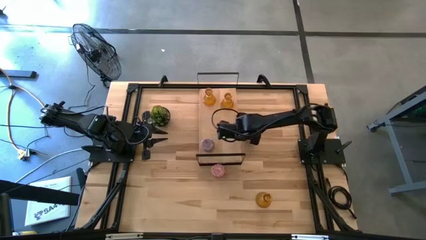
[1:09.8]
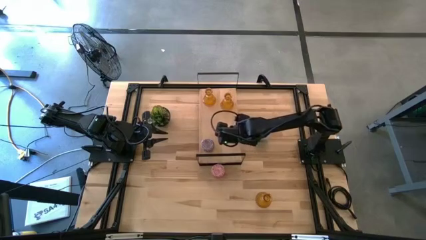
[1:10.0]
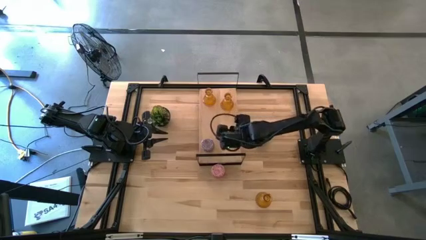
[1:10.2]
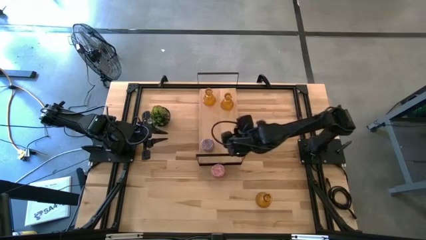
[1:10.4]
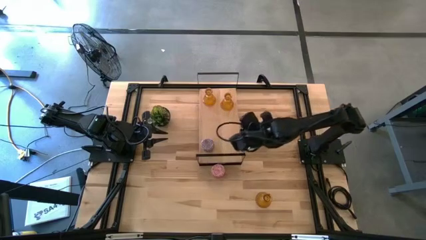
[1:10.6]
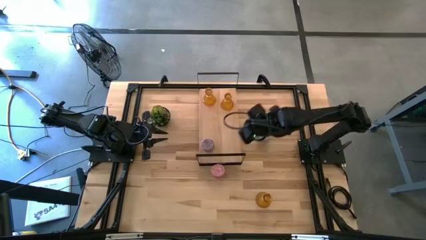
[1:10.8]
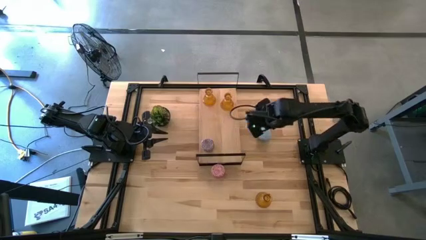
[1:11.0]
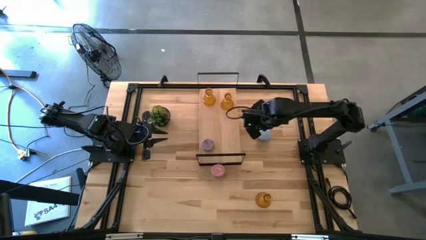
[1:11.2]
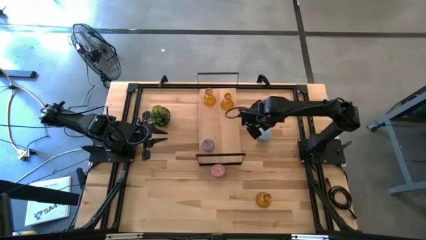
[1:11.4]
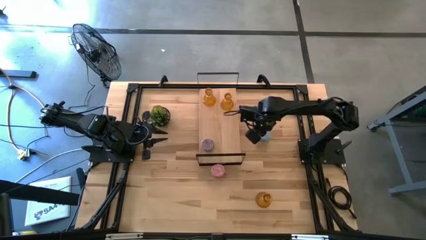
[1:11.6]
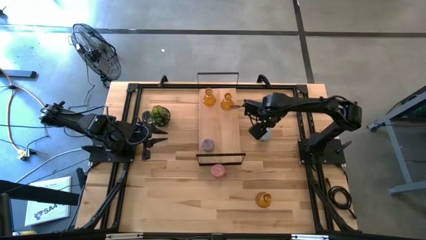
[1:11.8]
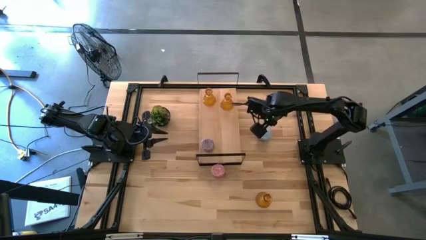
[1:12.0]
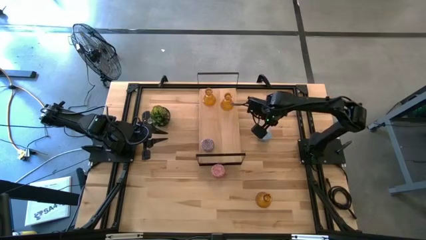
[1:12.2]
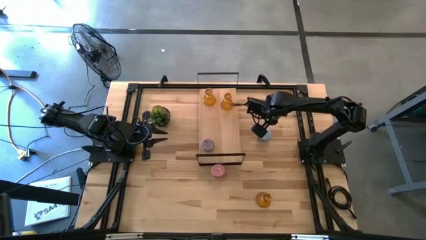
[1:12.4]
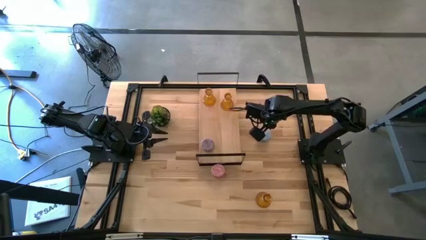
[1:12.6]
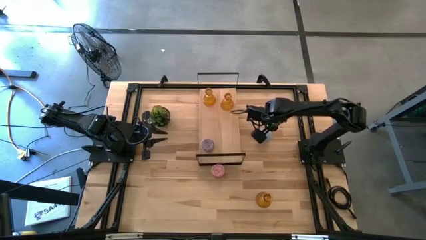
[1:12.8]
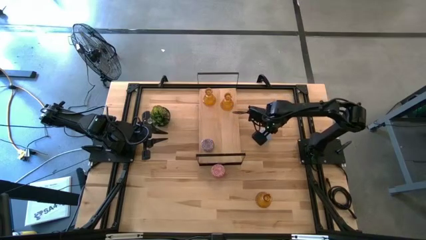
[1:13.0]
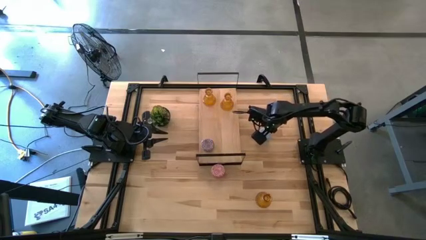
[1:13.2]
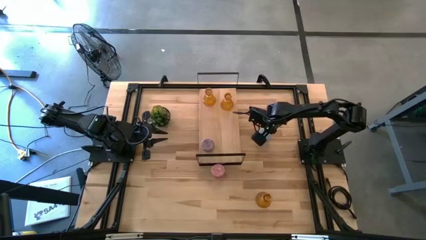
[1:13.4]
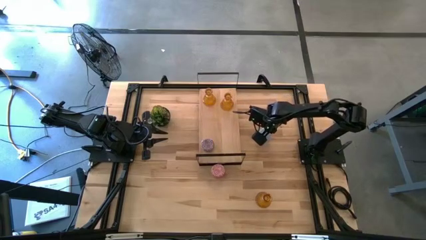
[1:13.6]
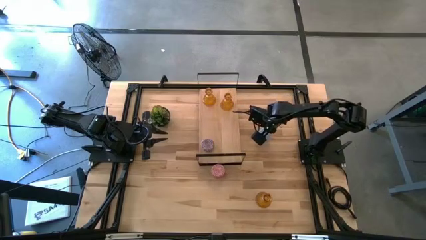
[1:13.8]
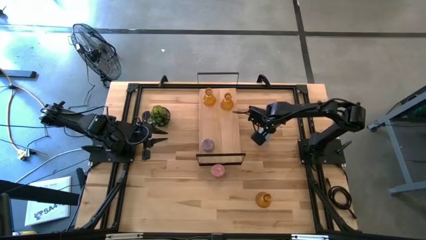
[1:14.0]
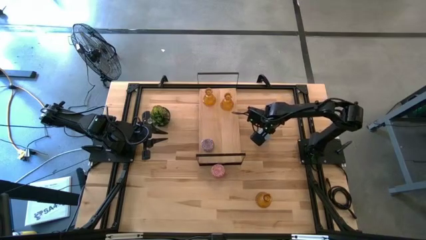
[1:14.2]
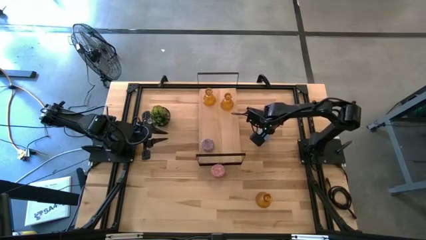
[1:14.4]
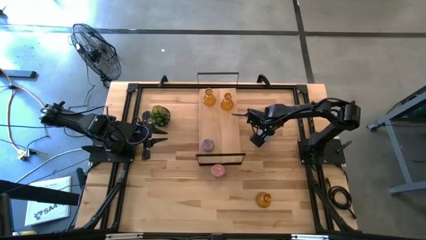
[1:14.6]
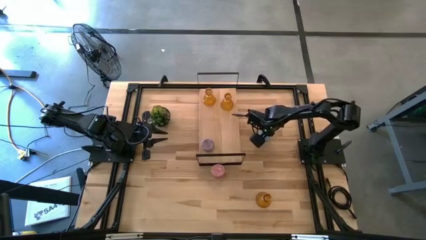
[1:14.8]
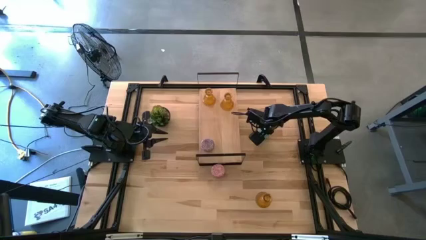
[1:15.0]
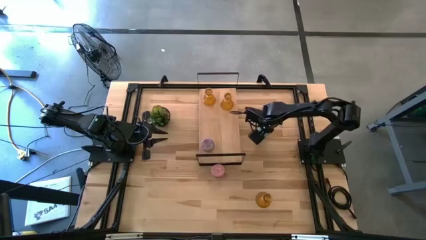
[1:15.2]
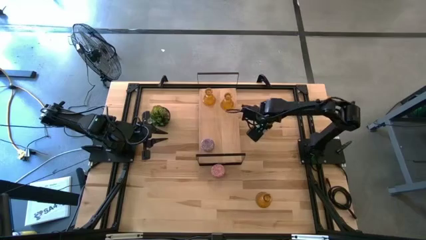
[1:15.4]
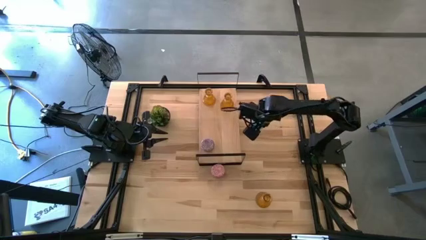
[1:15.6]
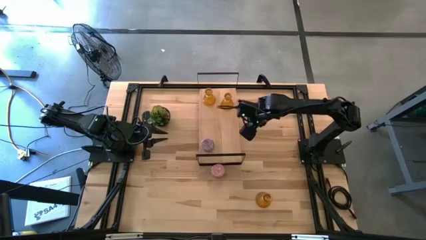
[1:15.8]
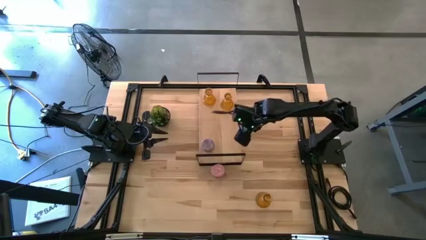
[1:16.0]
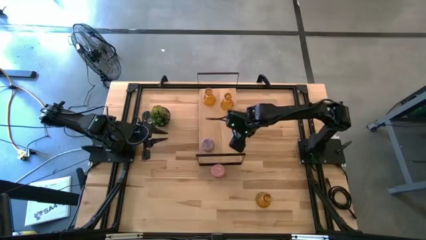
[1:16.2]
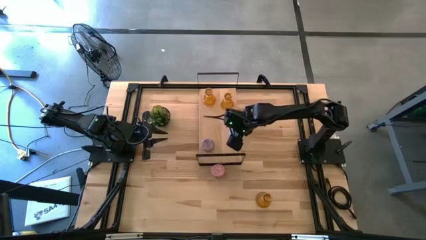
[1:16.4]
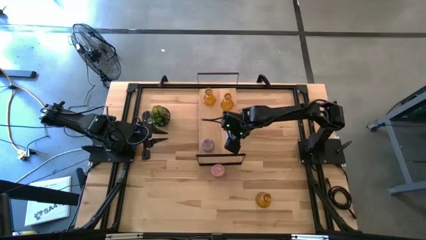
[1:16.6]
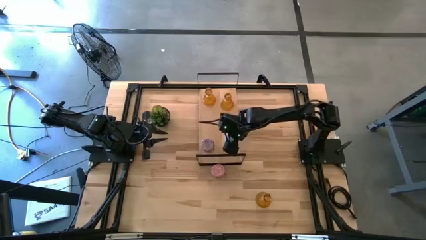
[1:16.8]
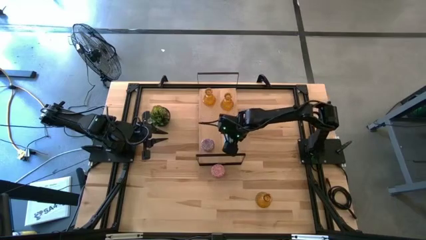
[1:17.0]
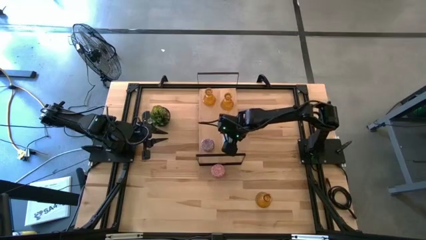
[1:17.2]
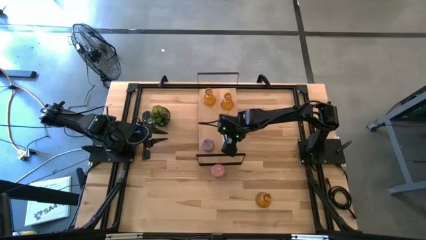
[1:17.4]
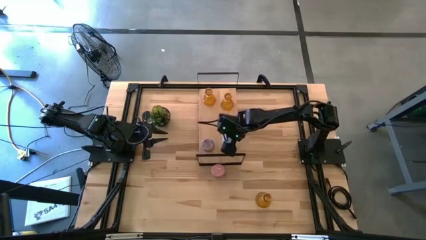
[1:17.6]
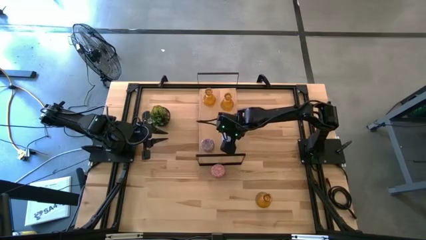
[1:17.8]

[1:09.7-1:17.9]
Task: Pick & Place candle stick holders
Put the blue scented candle on the shelf

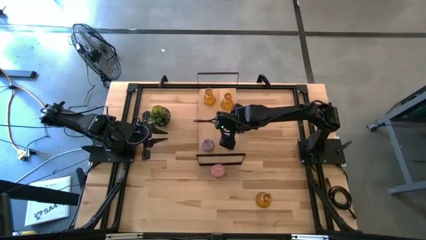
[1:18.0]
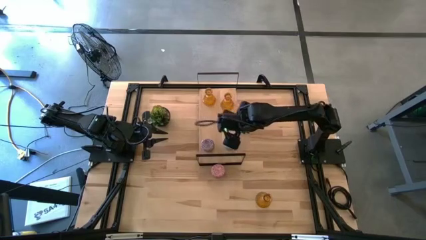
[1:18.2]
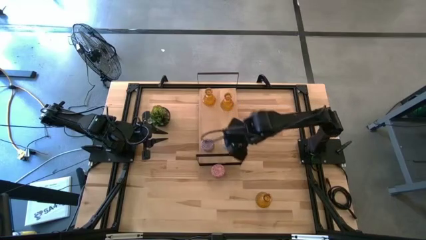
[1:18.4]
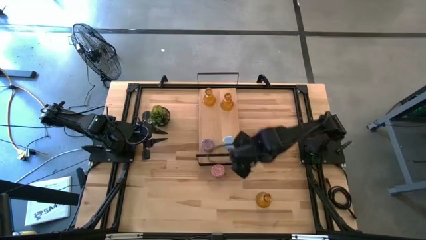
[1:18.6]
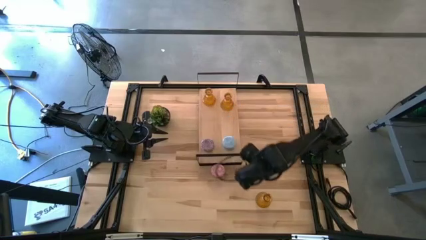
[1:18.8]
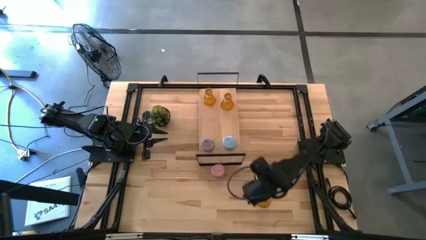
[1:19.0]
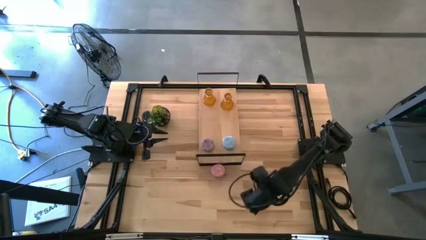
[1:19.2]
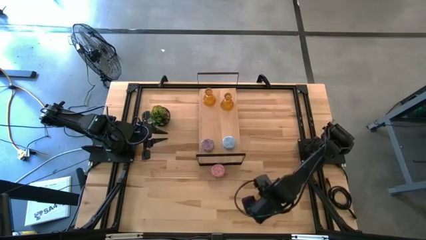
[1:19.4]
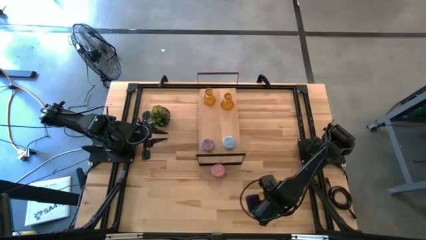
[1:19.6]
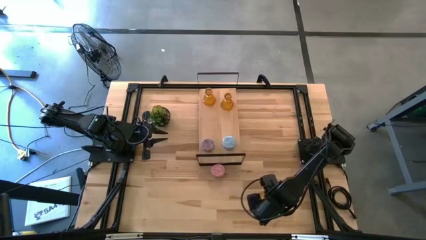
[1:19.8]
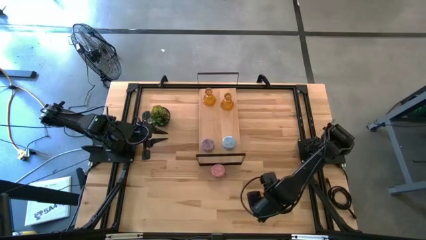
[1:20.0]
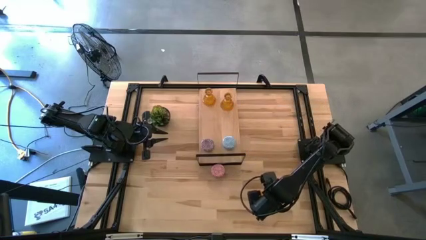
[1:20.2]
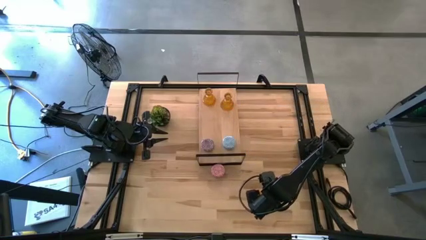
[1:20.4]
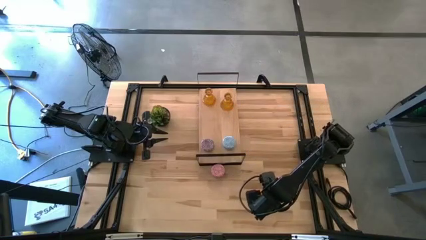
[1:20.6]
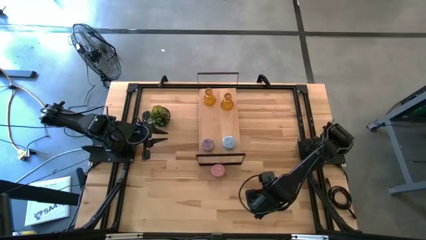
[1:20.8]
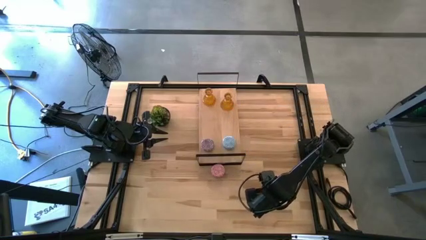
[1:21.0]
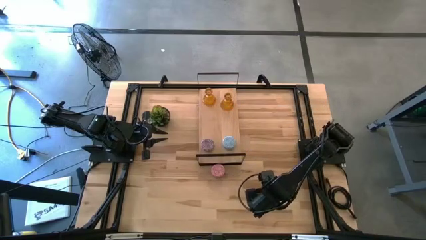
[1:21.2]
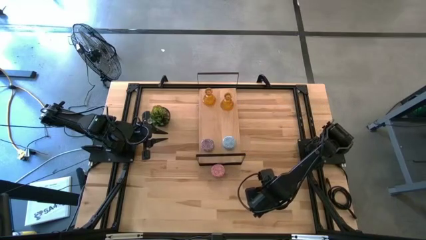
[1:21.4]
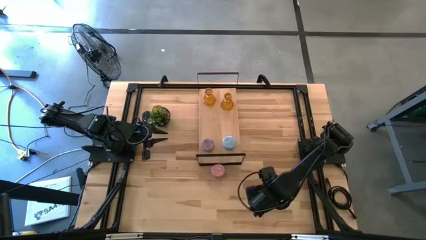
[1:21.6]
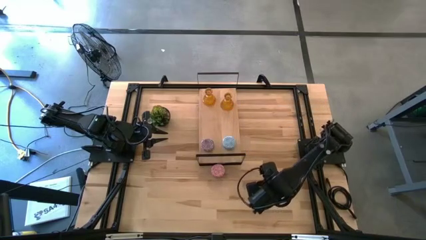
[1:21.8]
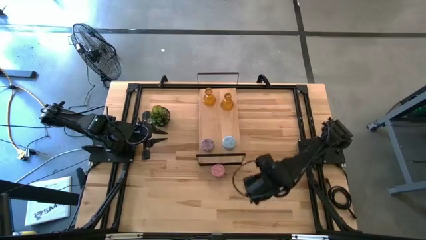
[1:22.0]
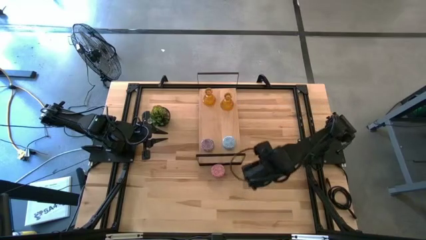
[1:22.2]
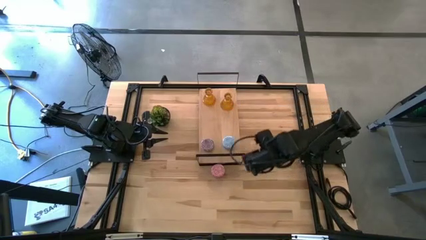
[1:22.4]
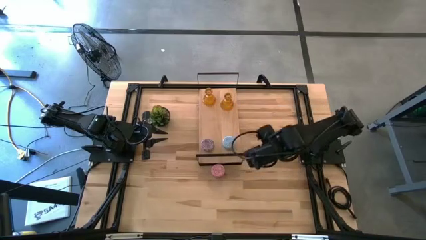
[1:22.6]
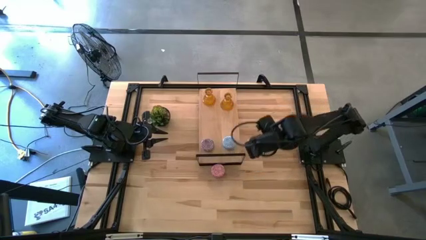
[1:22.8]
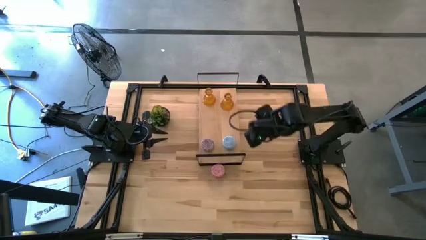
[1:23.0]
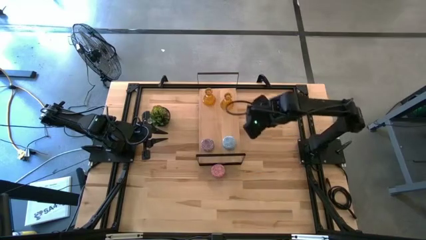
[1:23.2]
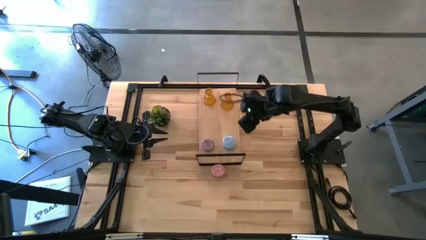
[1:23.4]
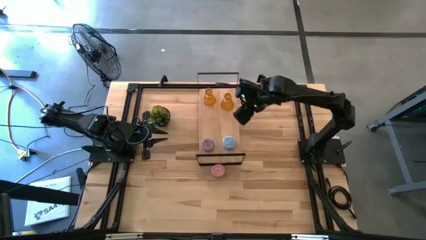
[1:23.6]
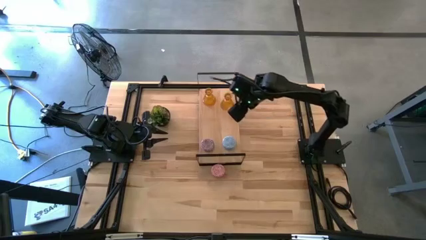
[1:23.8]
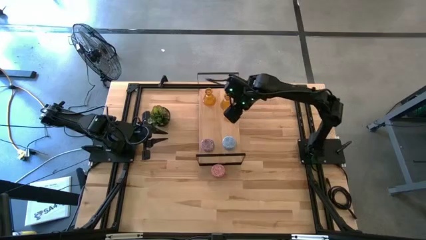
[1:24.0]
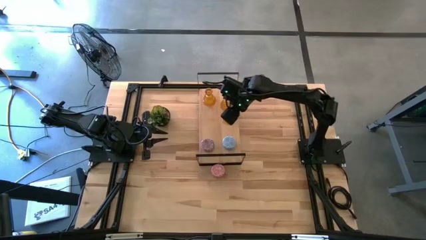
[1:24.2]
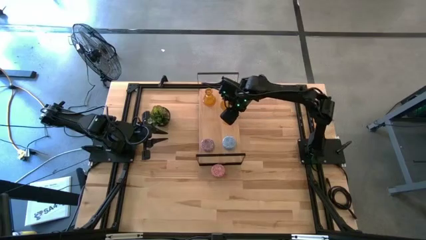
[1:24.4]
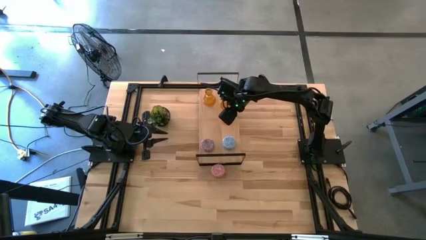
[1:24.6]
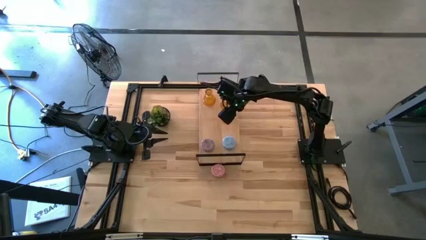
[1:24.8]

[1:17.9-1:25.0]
Put the orange glass candle holder on the shelf
